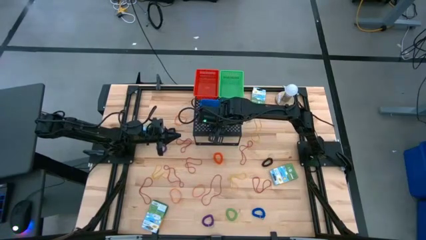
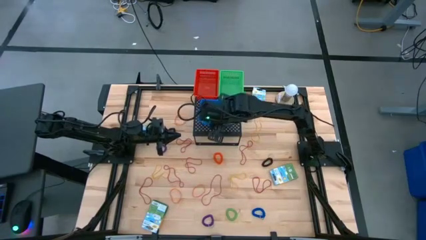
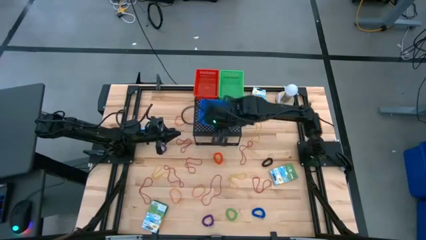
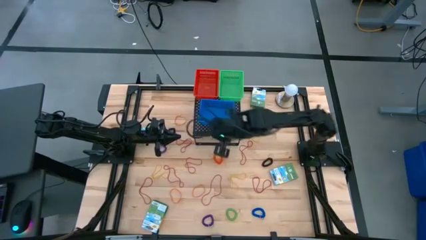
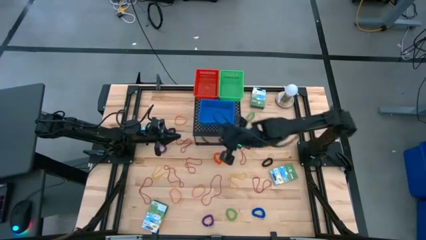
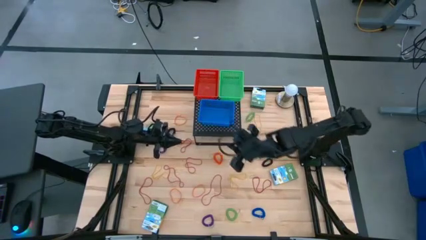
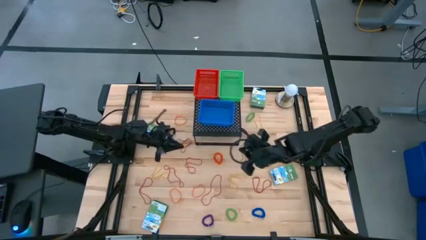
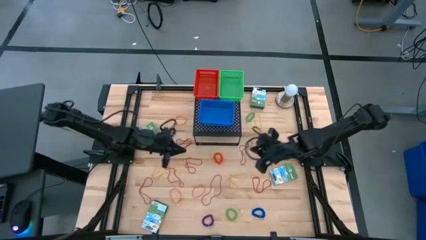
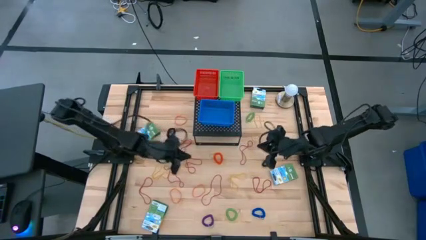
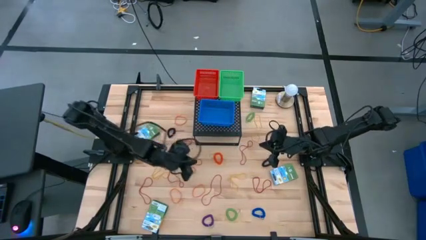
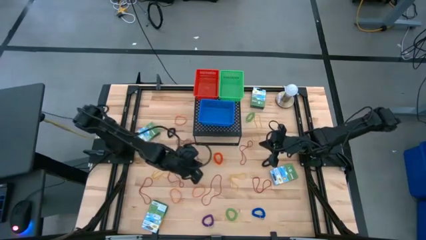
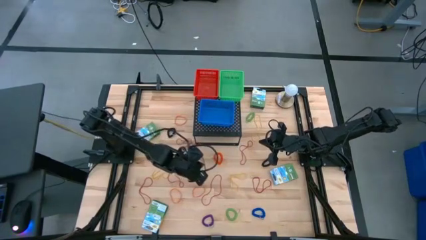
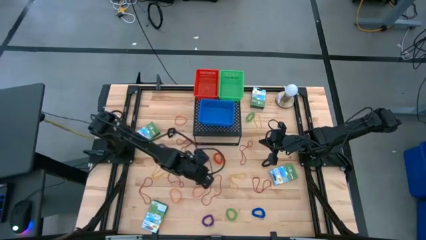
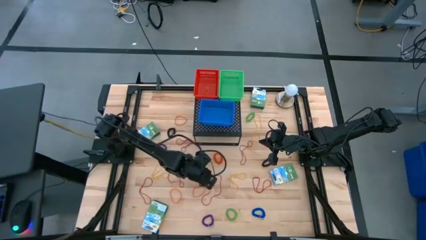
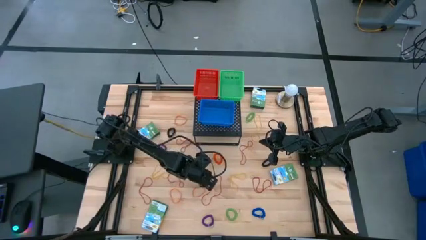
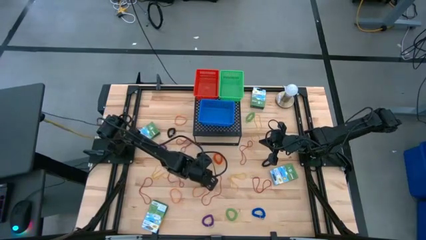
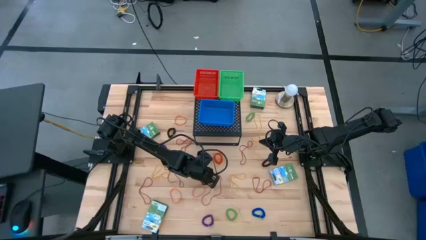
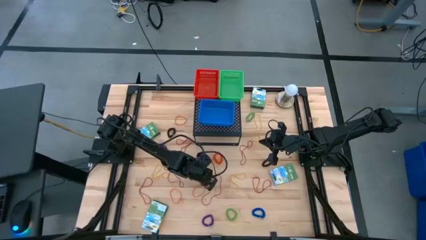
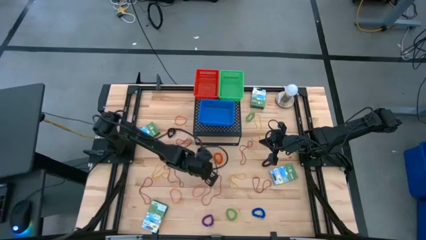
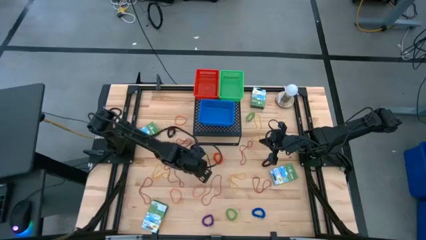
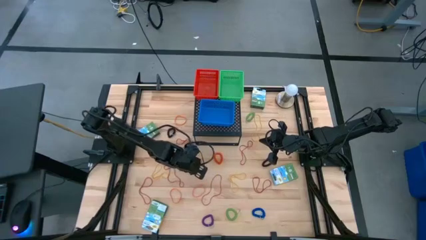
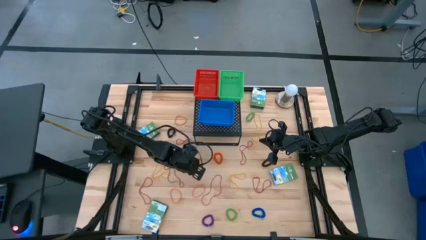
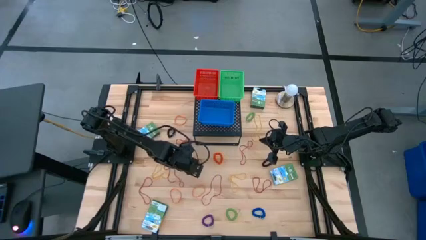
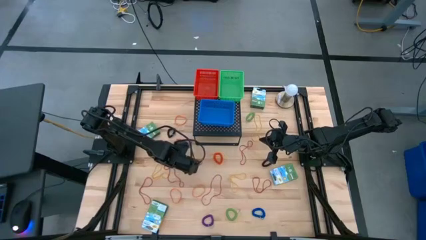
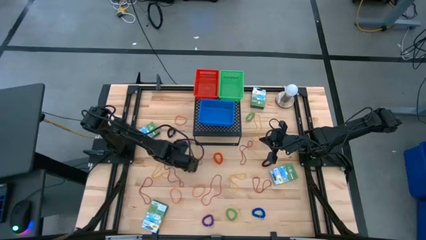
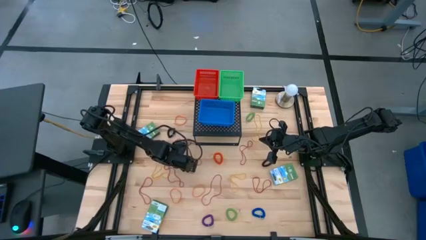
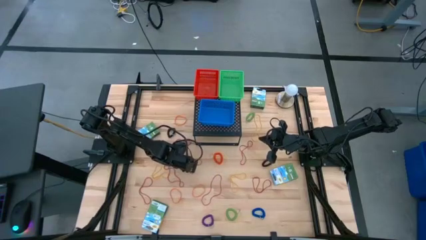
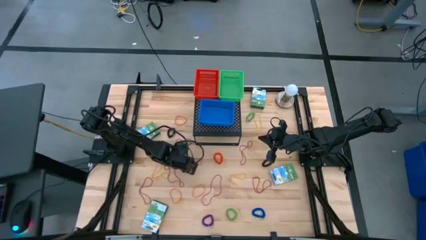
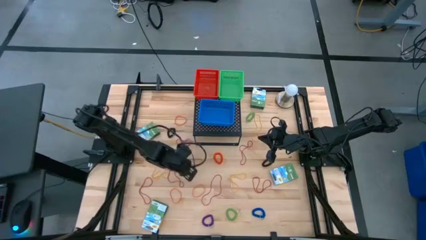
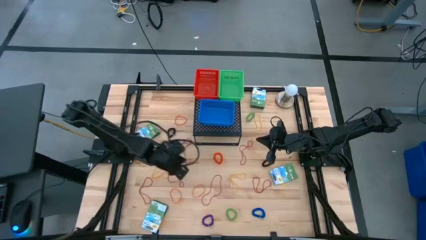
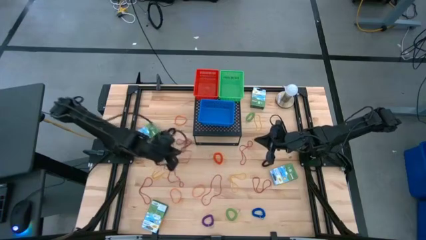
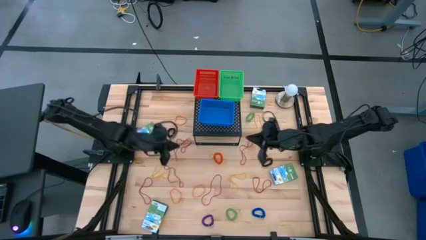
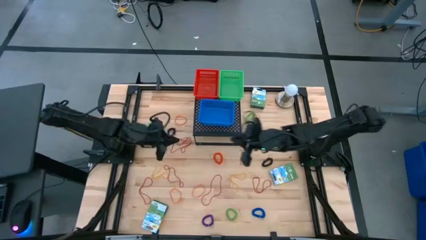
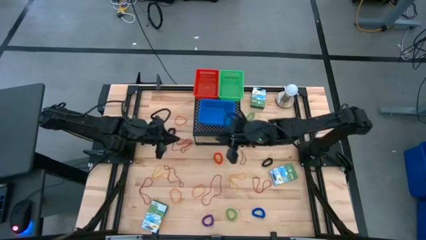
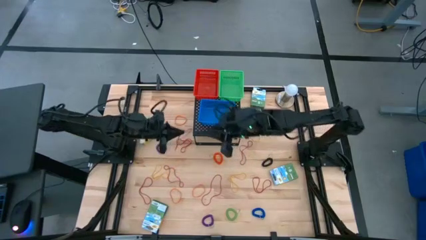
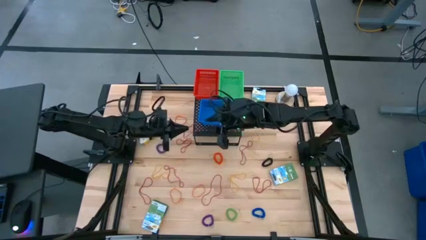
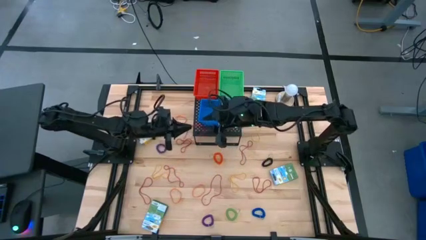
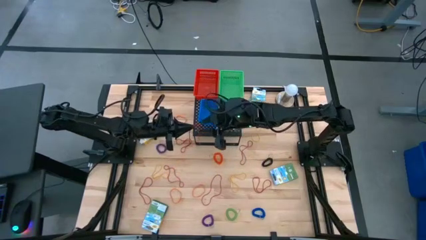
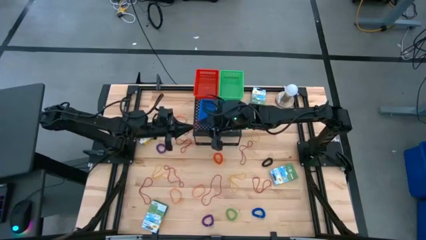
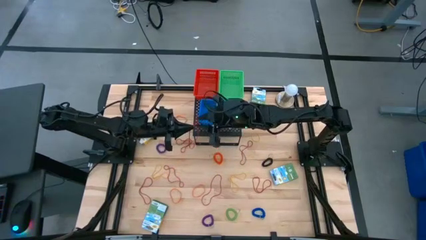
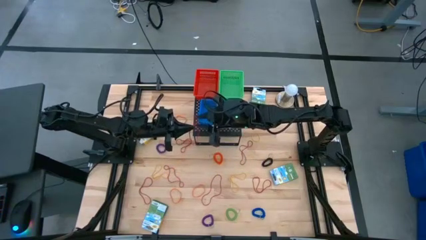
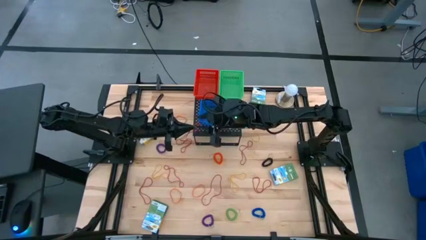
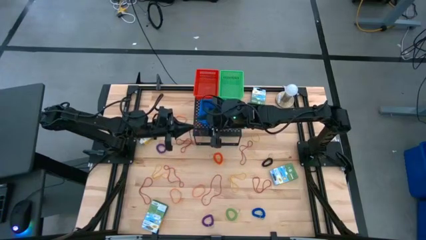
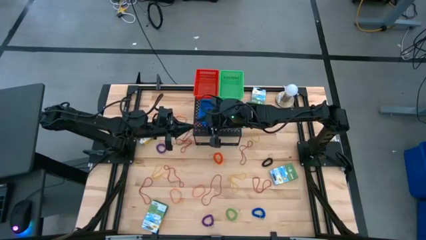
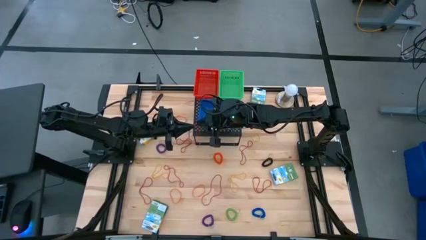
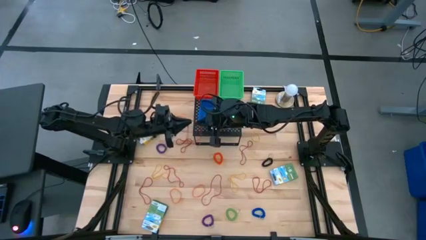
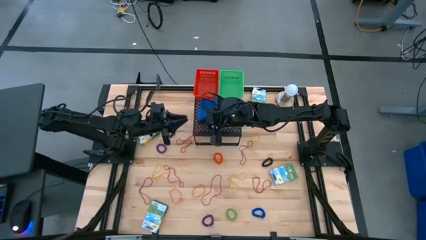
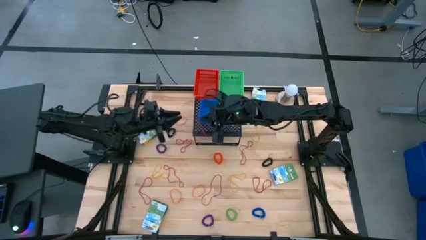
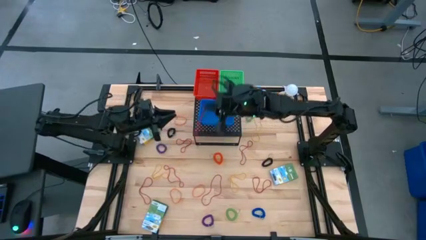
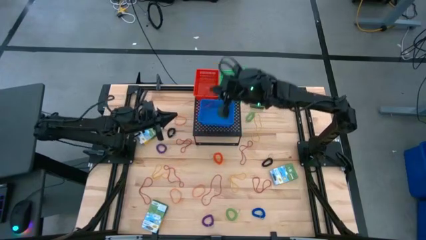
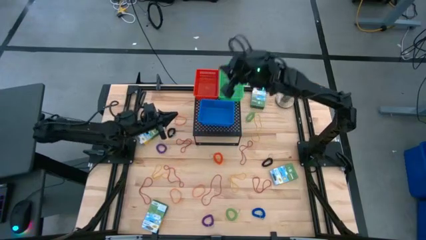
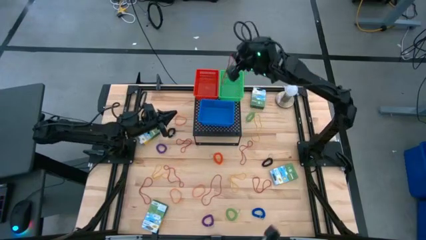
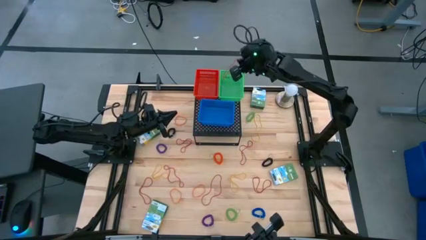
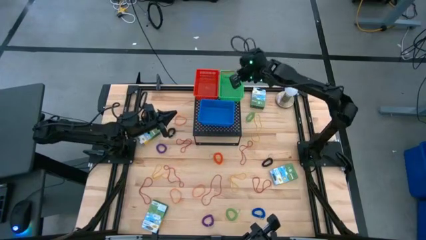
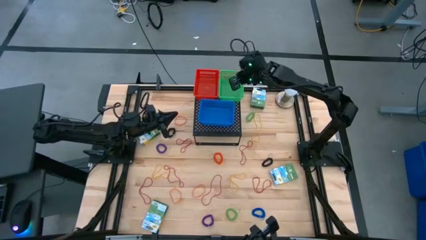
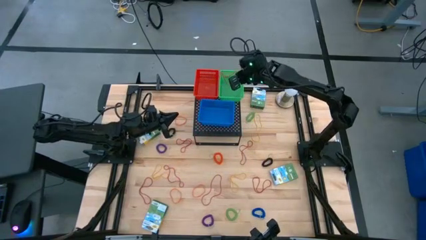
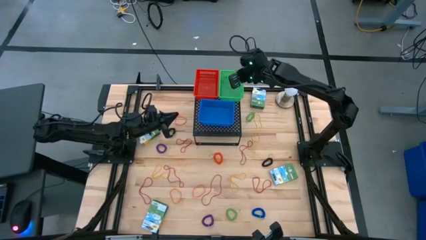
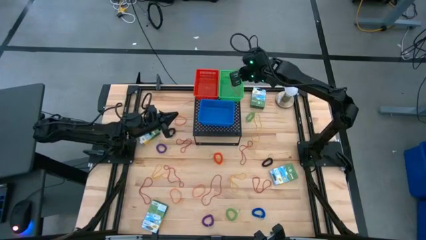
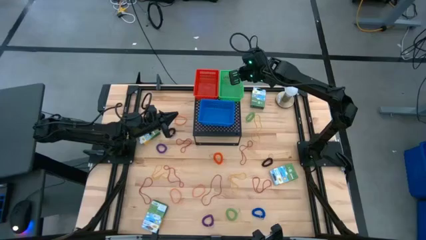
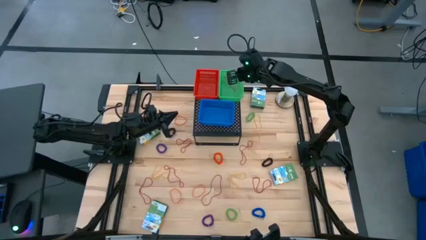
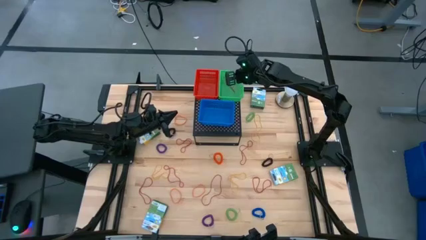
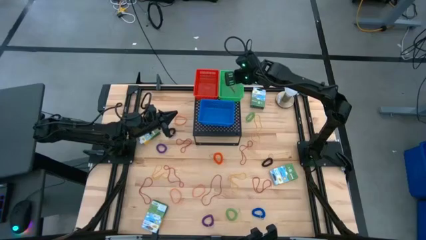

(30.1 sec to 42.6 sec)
Task: Pick & Place Office Desk Supplies
Put the red rubber band into the green bin on the shelf

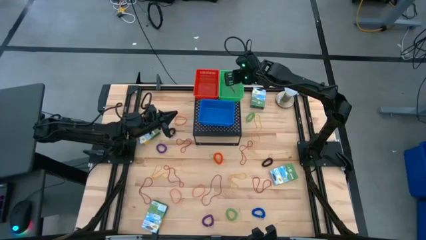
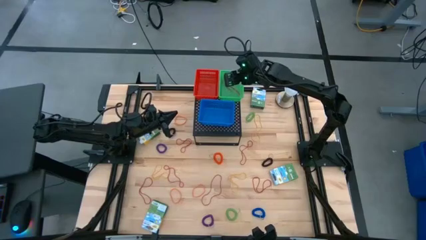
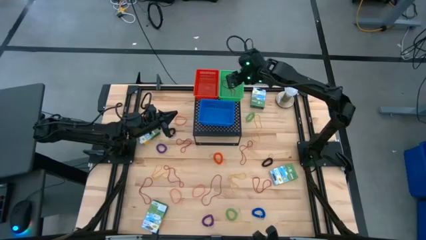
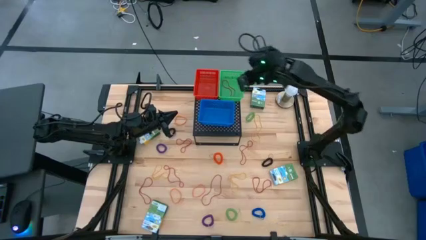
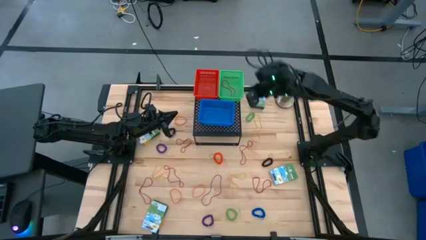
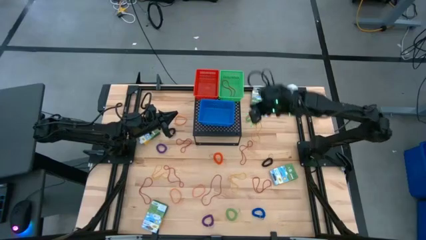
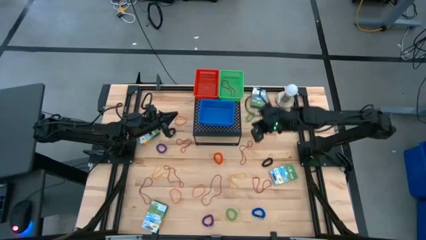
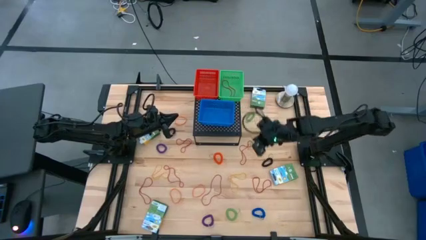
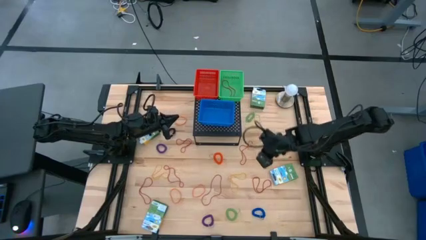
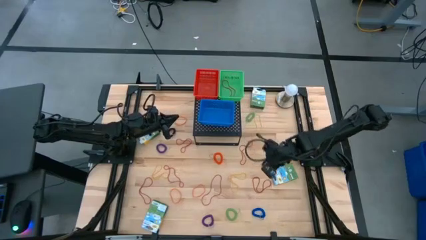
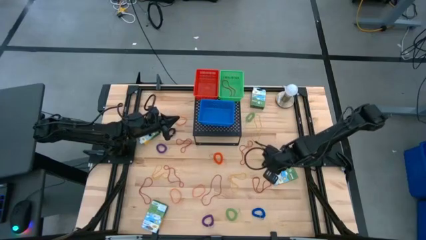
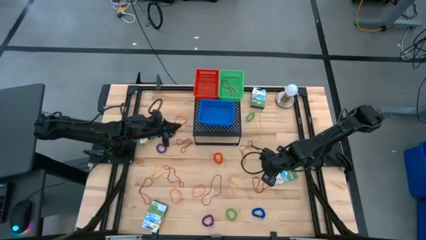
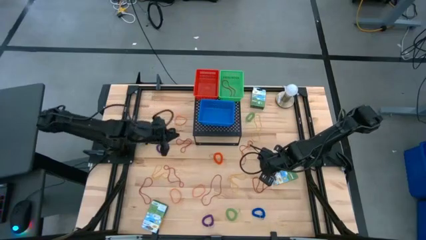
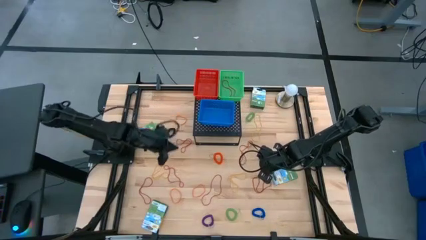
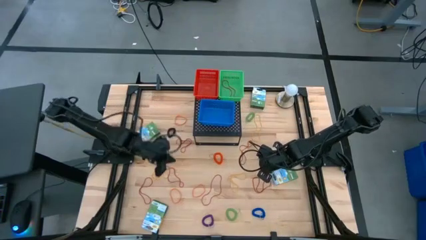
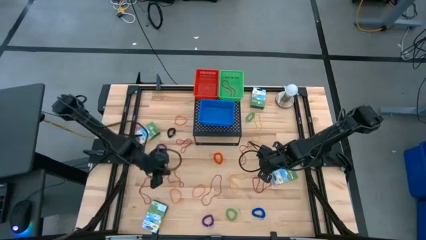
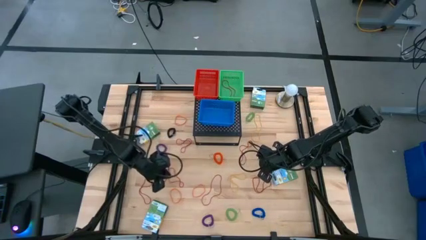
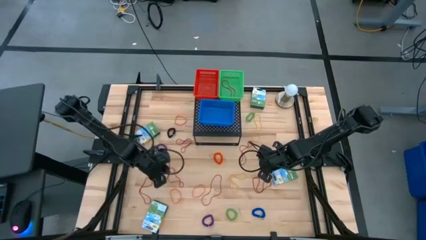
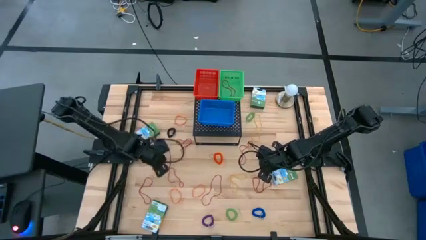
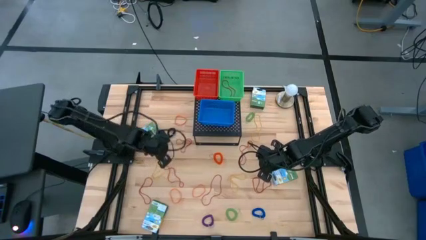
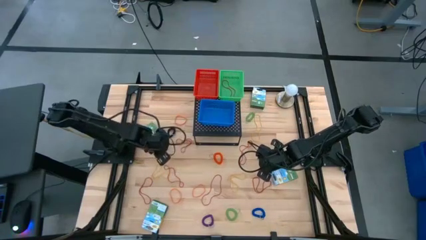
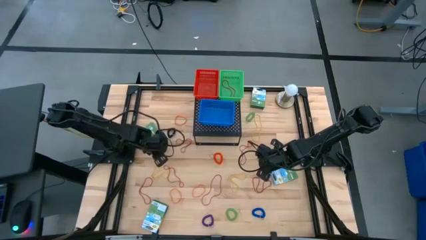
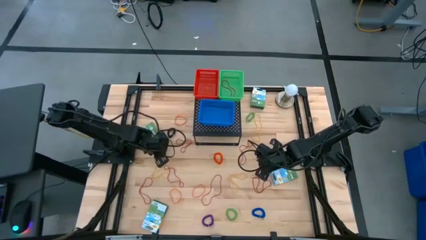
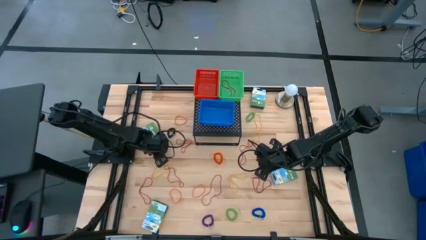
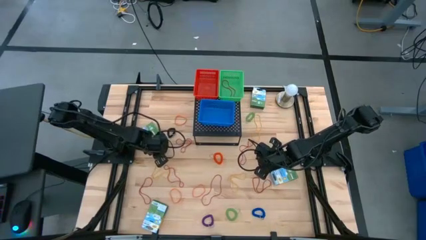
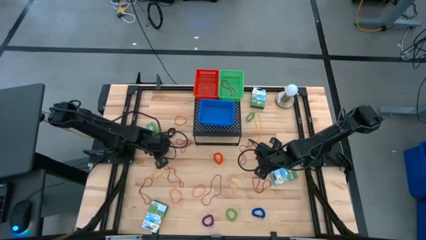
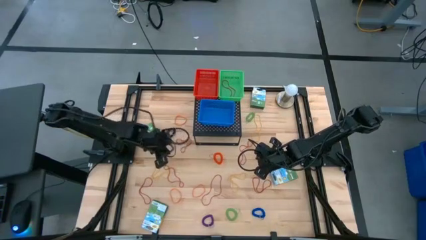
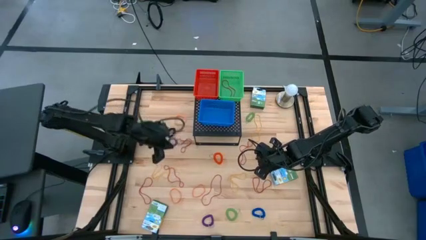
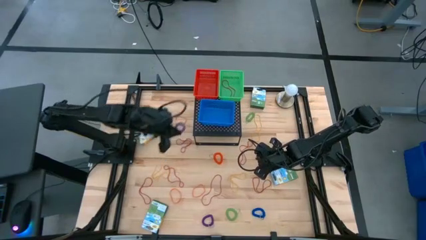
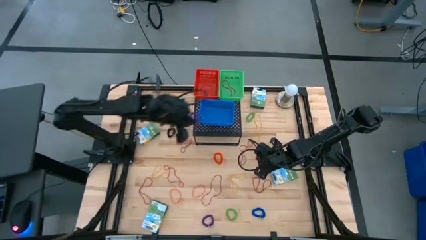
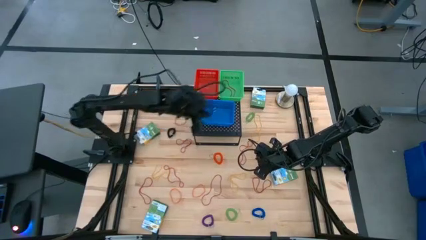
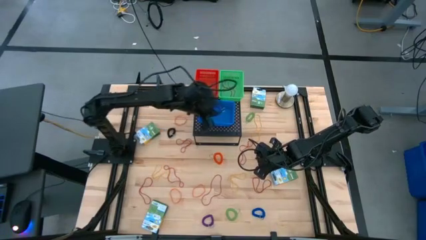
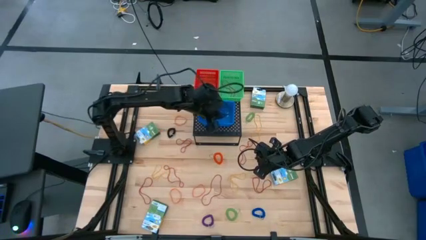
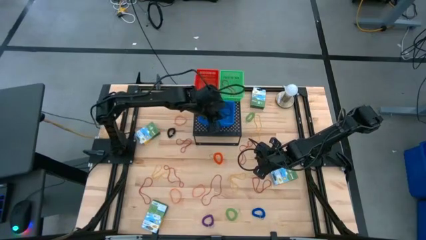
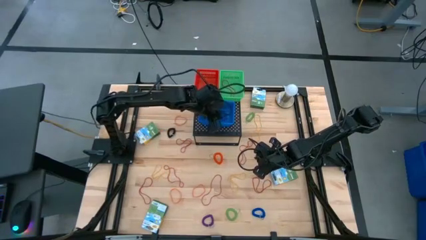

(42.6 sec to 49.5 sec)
Put the purple spring keychain into the blue bin on the shelf
